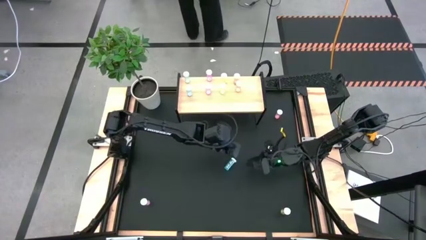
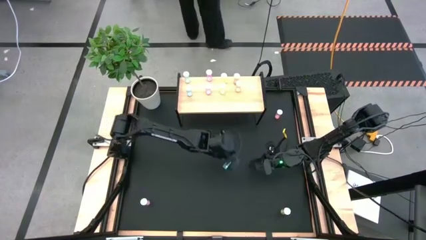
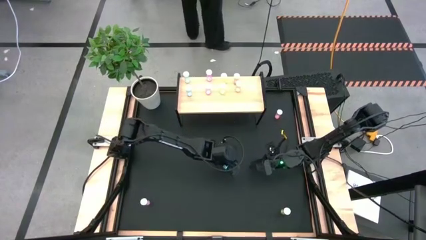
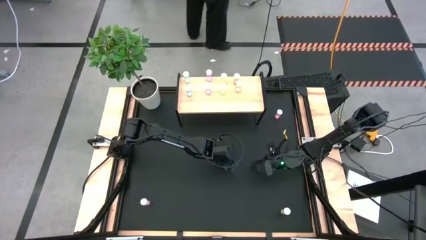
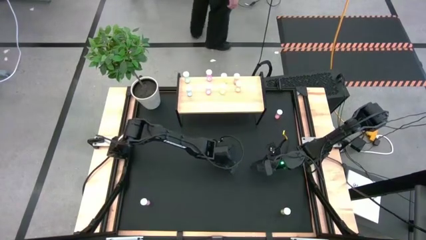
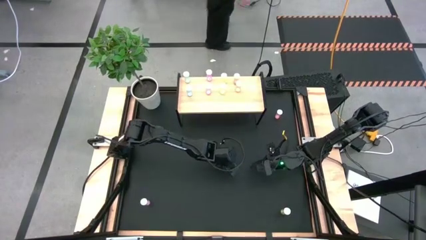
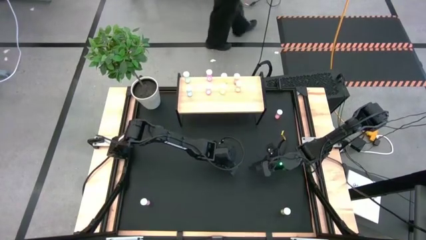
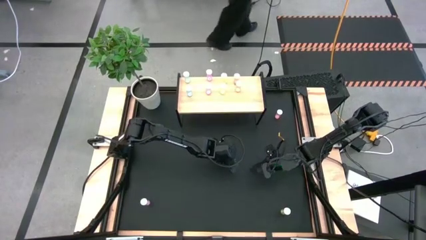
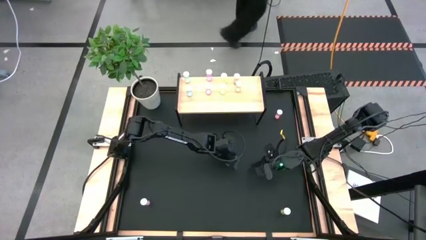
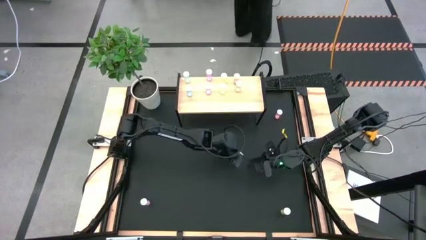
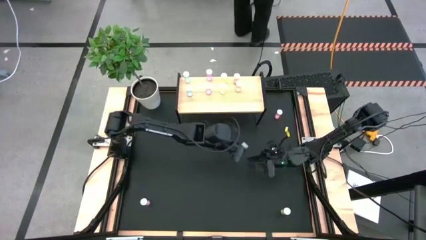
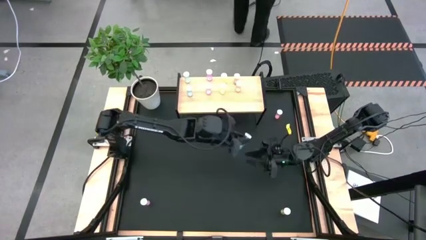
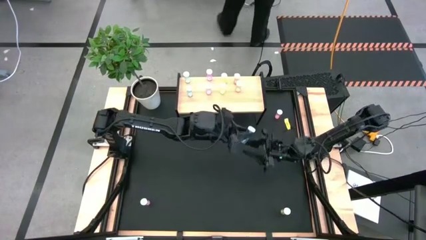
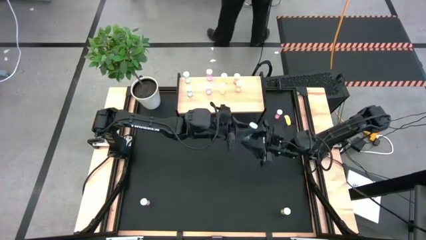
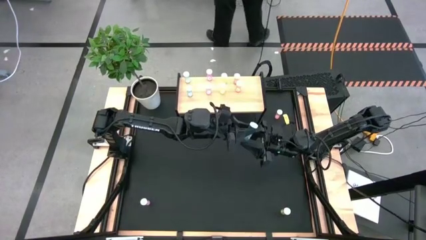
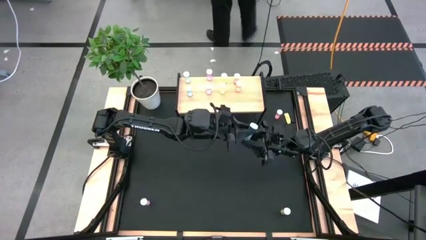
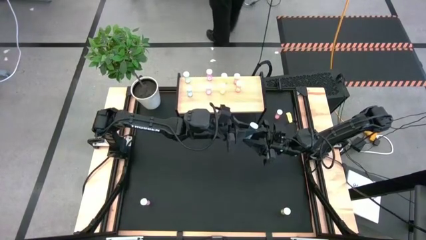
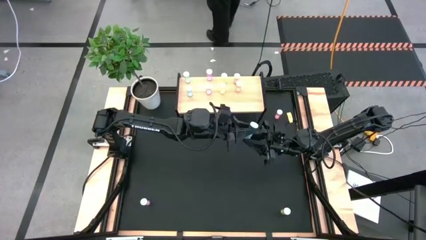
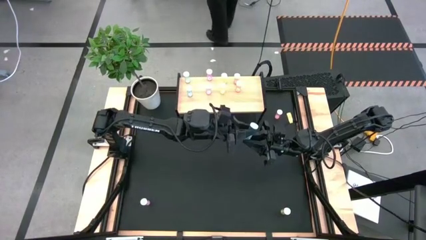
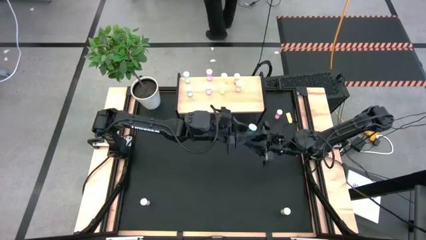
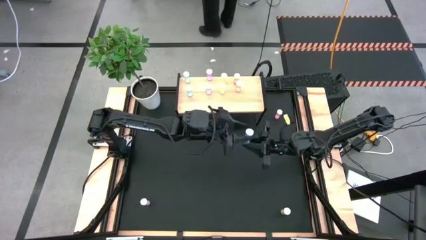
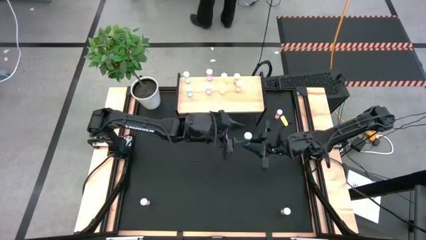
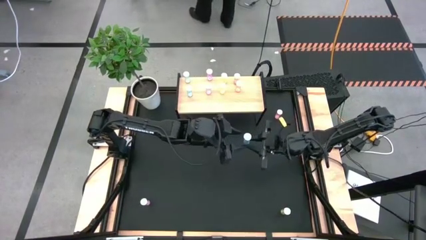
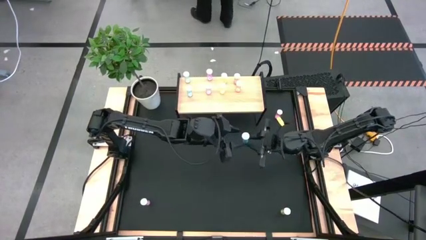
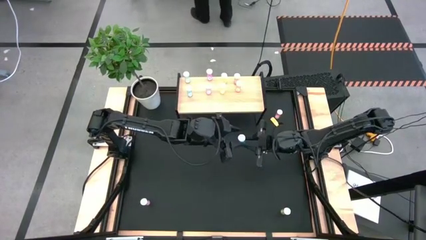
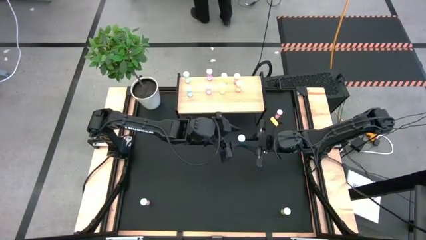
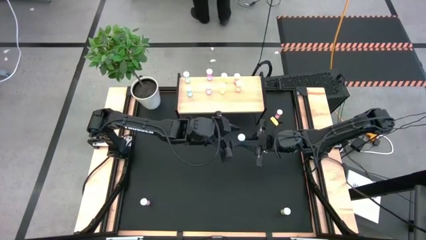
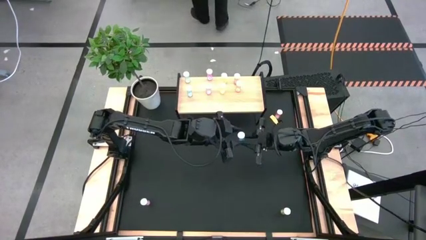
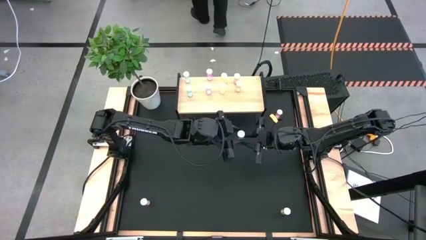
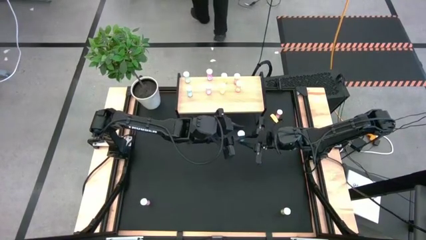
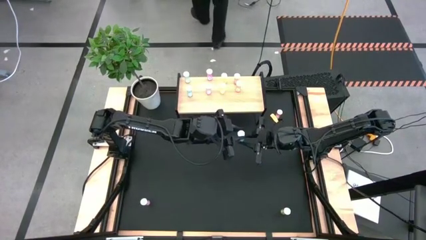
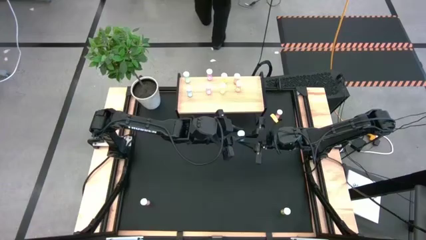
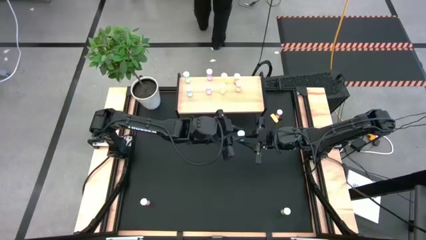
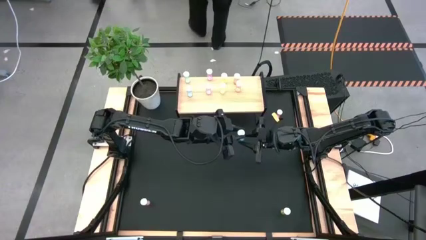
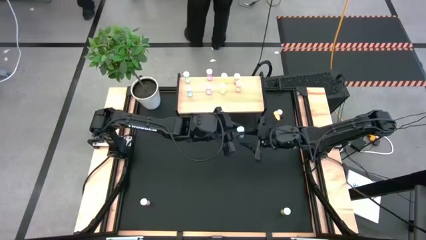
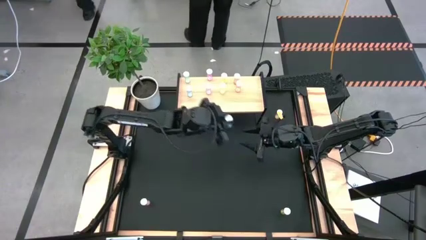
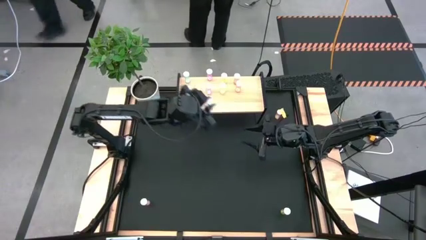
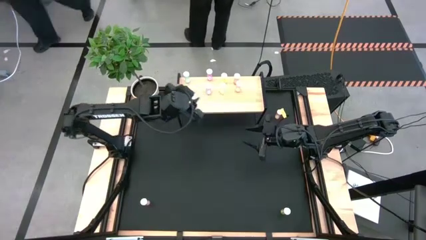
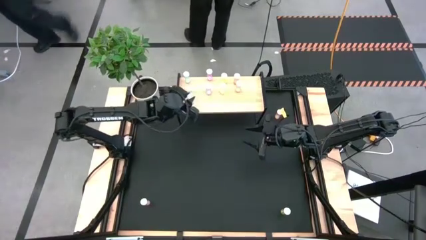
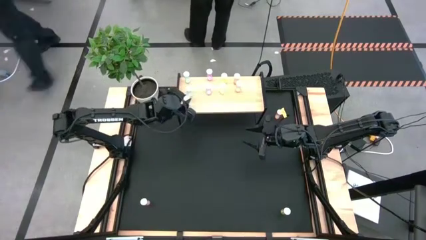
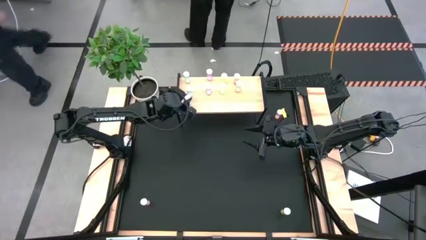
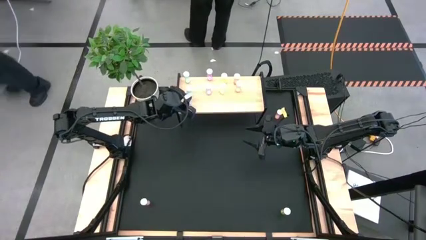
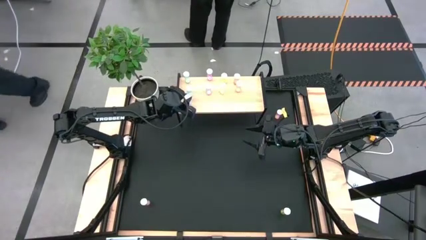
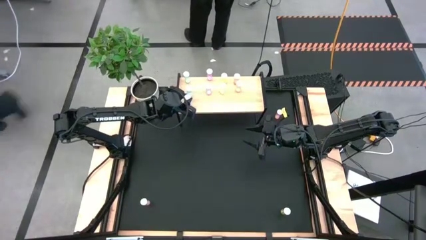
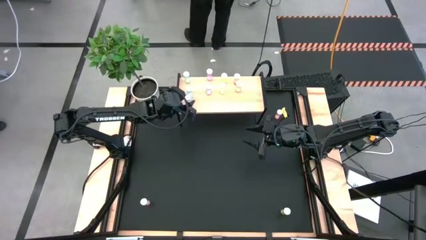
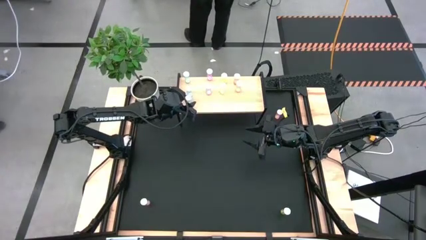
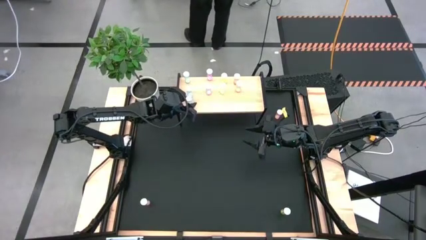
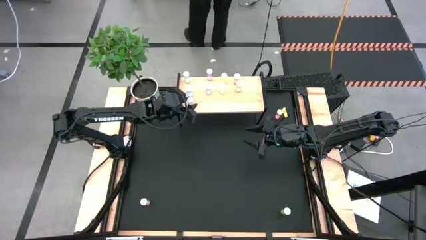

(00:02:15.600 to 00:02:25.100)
Task: Pick and place medicine bottles onto shelf by color
Put the blue pill bottle on the shelf aligned with the other blue pill bottles

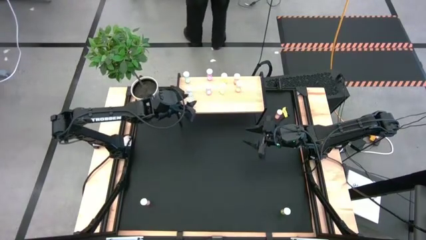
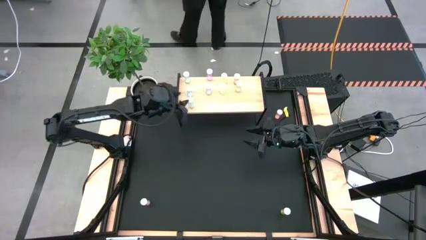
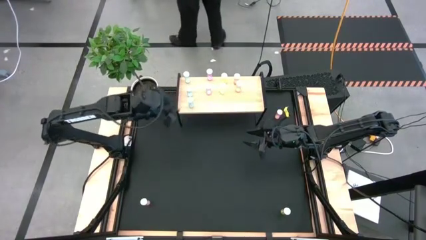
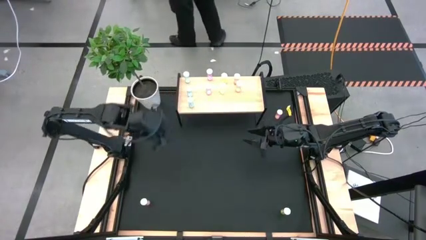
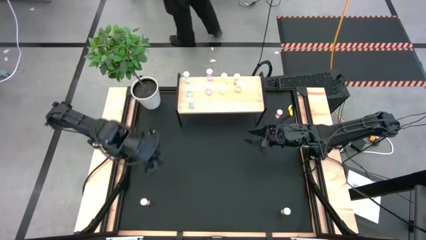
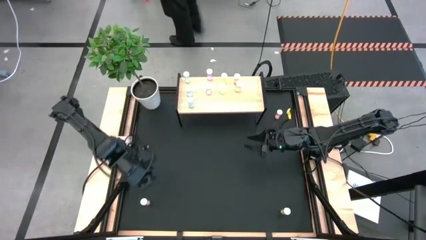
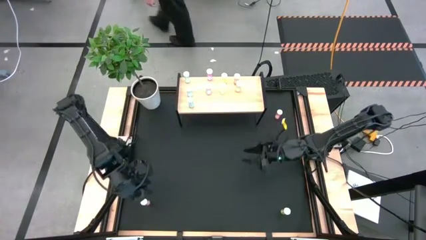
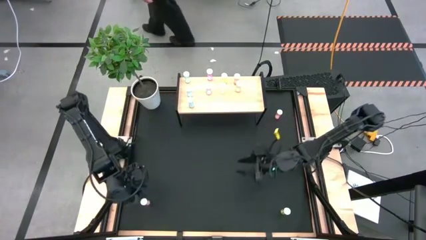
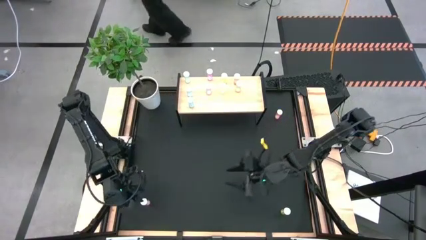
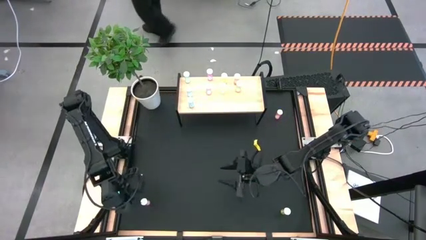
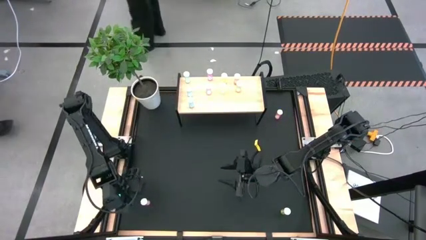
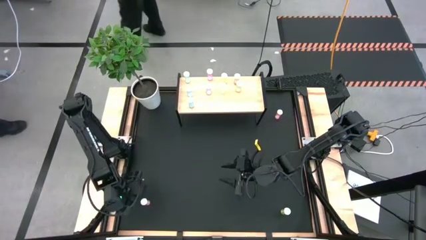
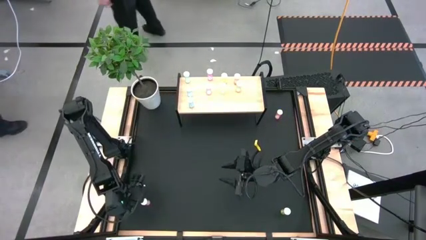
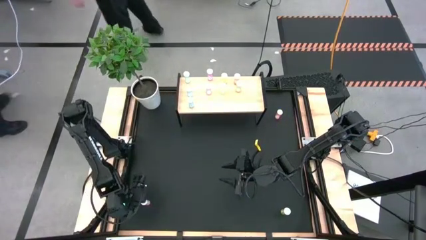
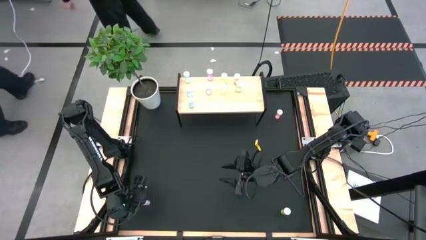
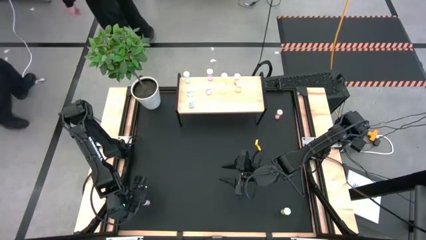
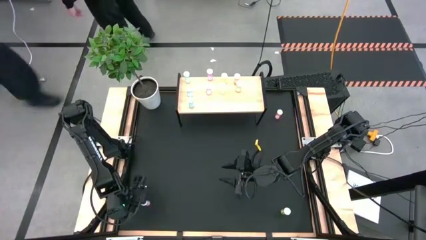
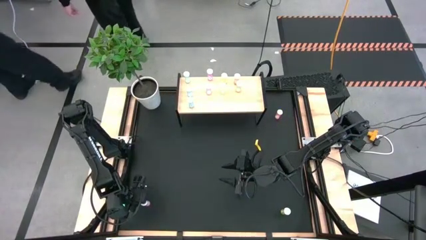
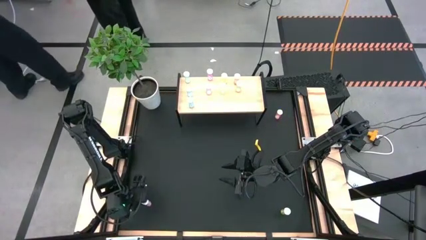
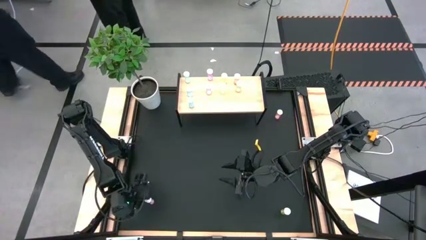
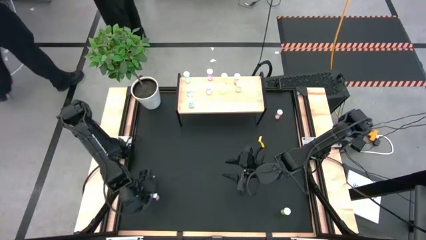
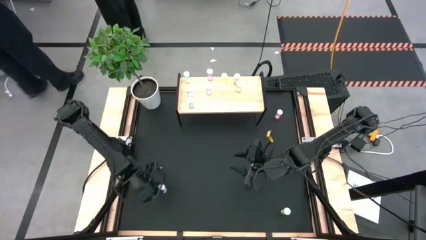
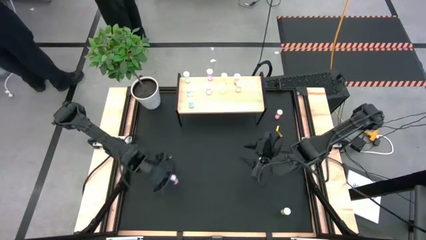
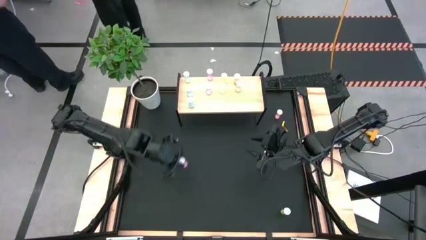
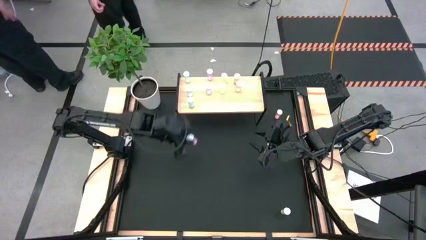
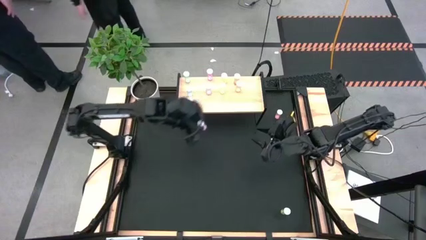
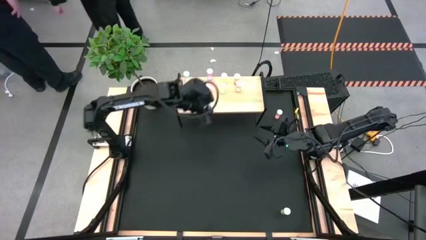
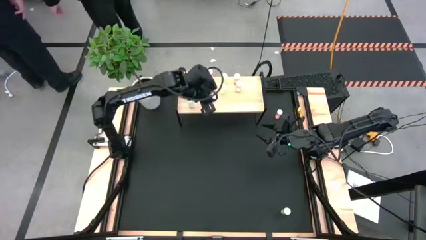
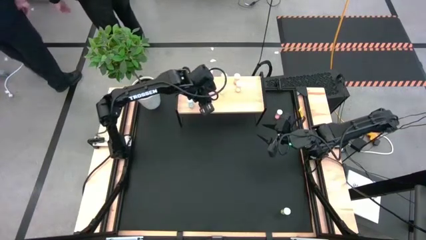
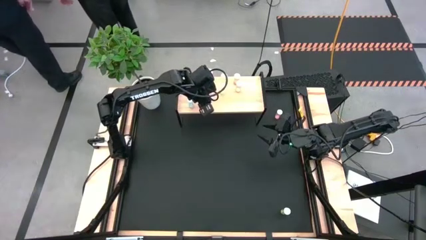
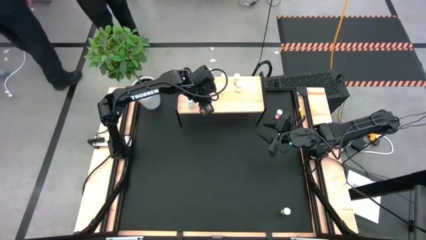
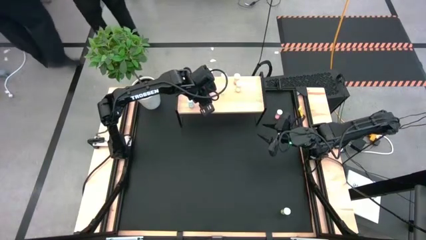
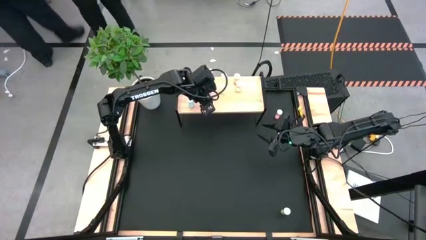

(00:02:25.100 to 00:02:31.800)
Put the pink pill bottle on the shelf aligned with the other pink bottles
